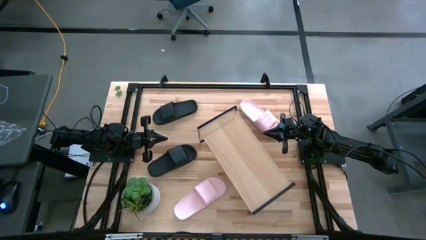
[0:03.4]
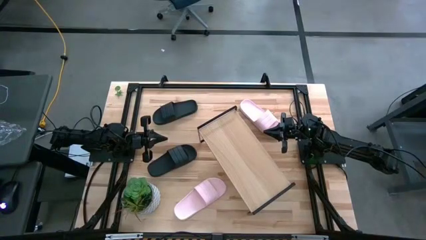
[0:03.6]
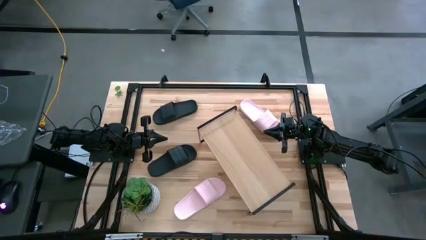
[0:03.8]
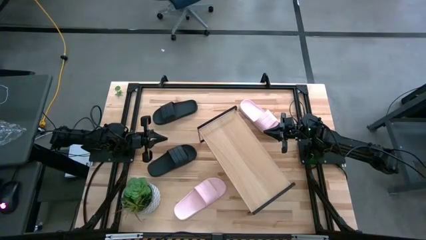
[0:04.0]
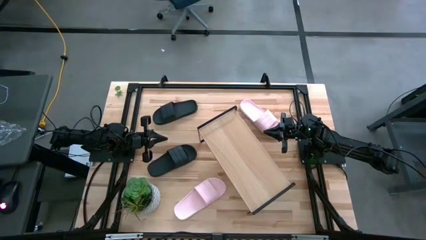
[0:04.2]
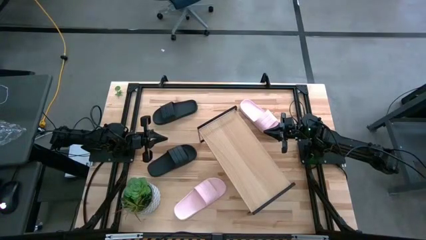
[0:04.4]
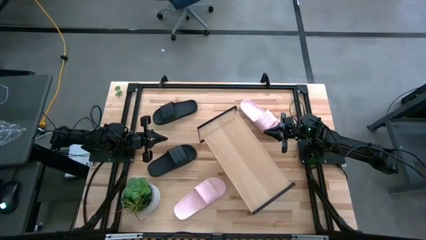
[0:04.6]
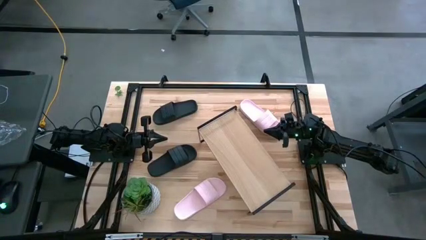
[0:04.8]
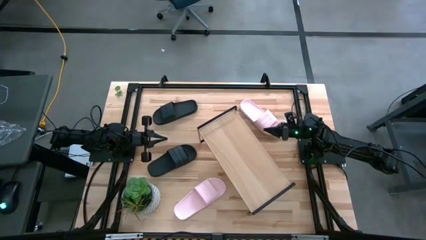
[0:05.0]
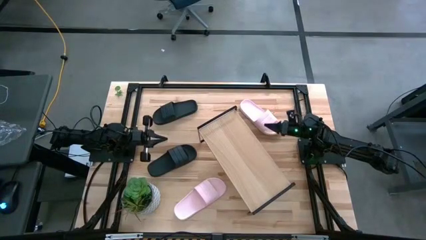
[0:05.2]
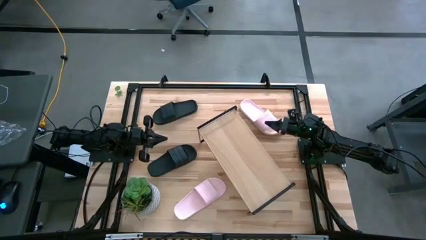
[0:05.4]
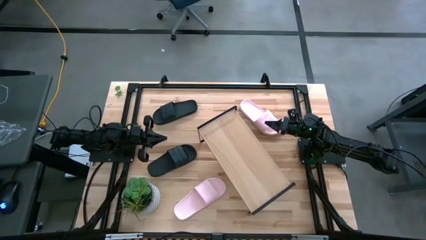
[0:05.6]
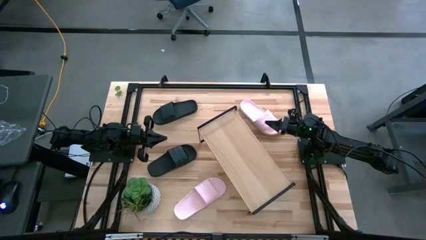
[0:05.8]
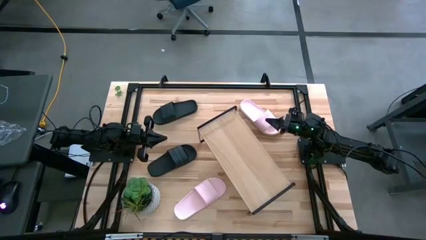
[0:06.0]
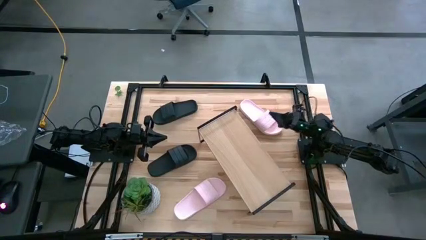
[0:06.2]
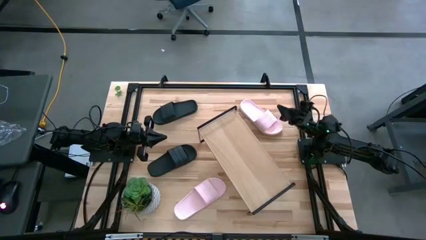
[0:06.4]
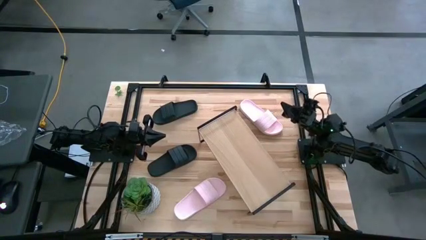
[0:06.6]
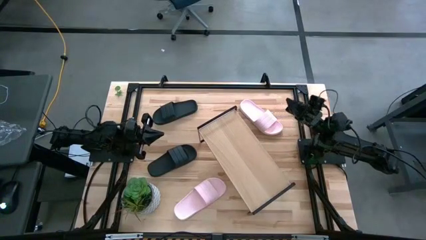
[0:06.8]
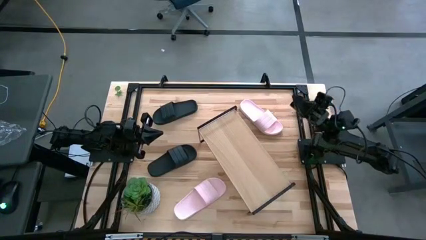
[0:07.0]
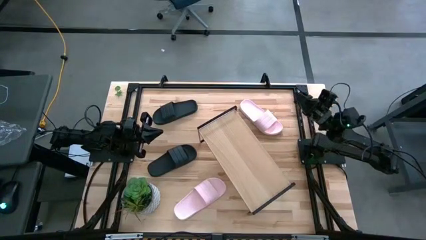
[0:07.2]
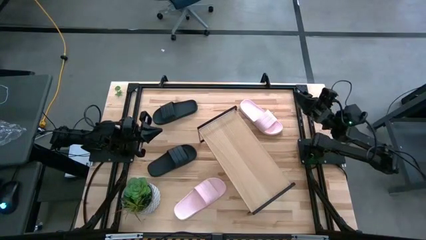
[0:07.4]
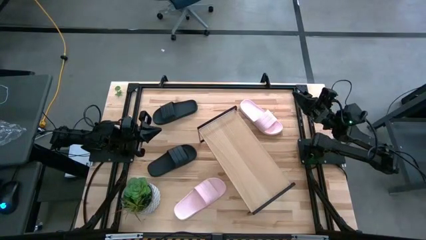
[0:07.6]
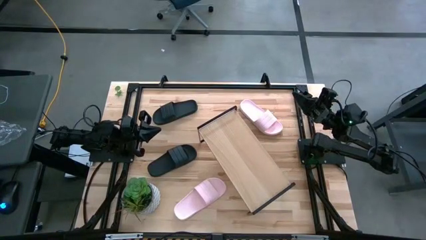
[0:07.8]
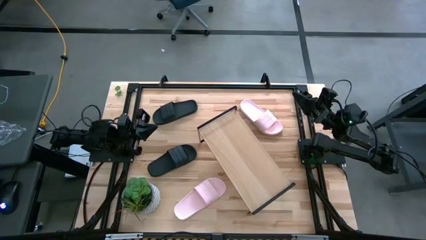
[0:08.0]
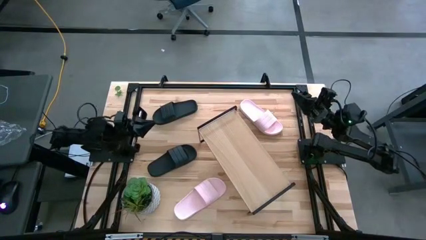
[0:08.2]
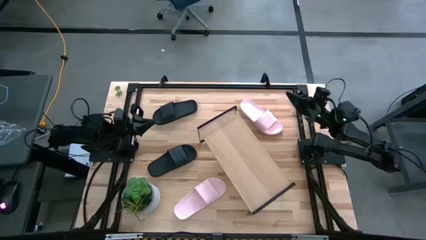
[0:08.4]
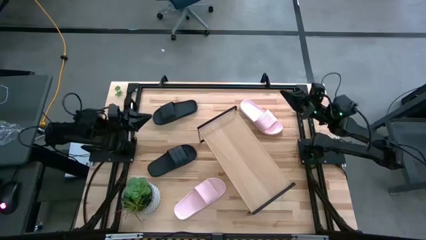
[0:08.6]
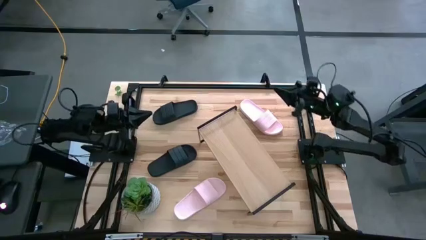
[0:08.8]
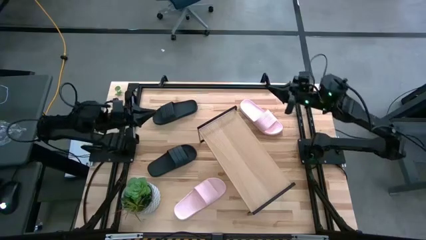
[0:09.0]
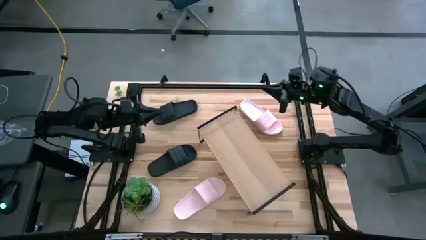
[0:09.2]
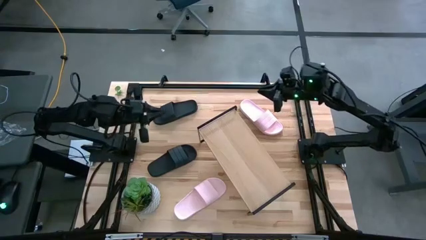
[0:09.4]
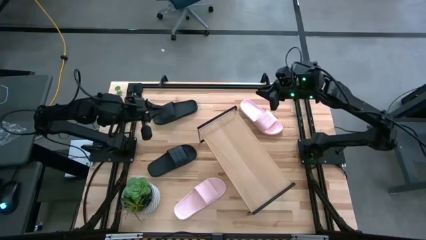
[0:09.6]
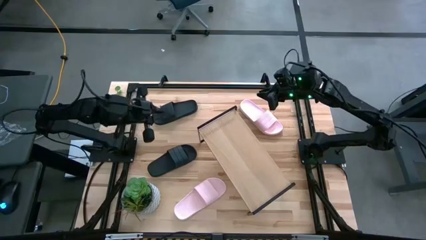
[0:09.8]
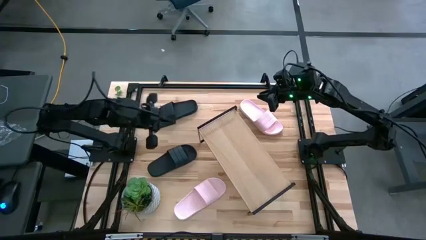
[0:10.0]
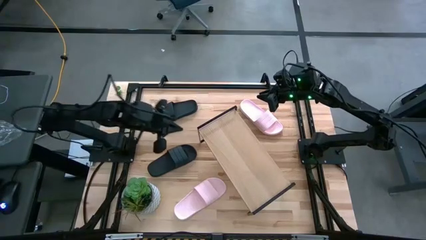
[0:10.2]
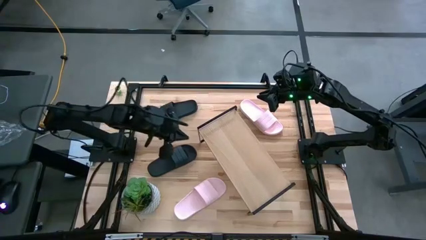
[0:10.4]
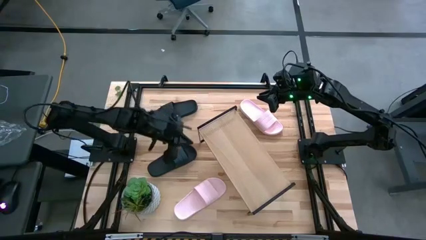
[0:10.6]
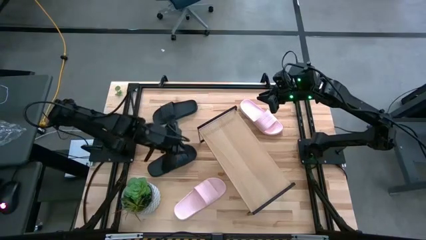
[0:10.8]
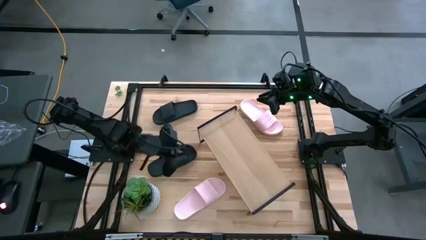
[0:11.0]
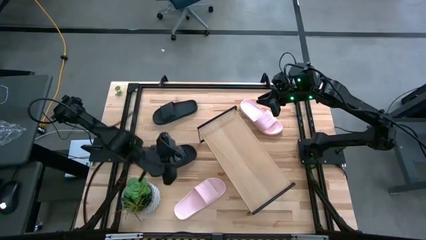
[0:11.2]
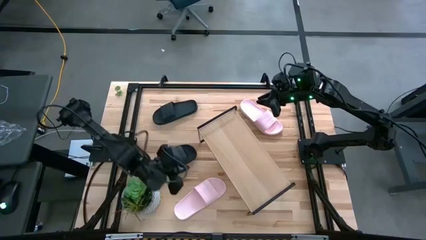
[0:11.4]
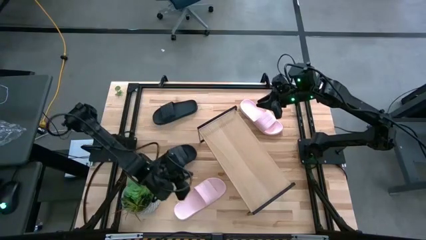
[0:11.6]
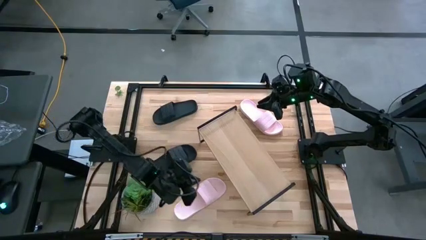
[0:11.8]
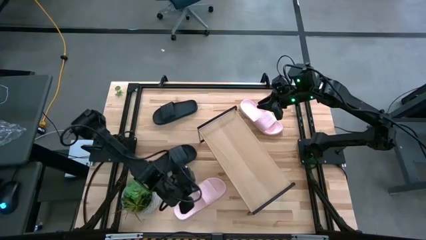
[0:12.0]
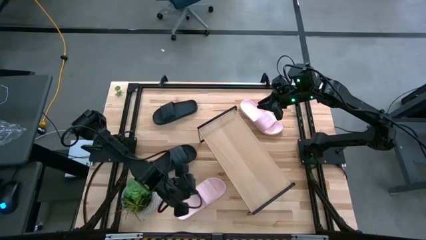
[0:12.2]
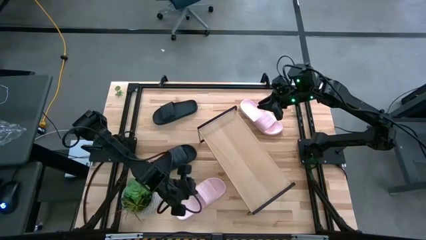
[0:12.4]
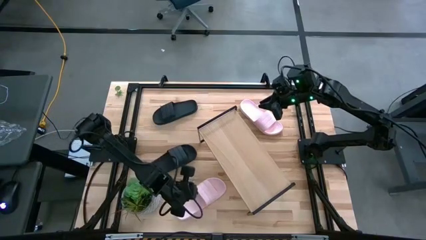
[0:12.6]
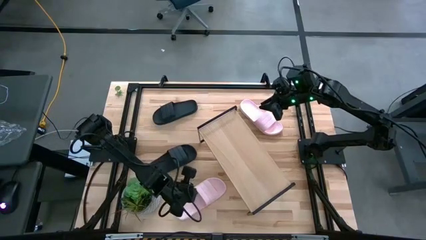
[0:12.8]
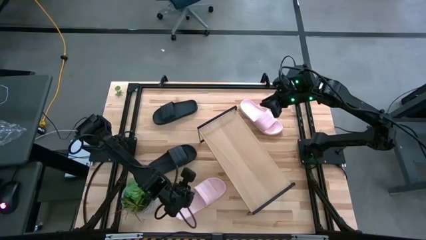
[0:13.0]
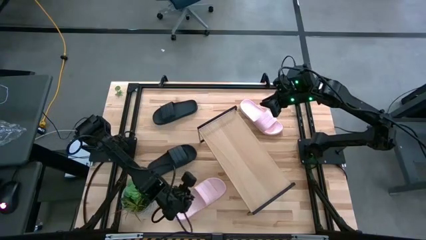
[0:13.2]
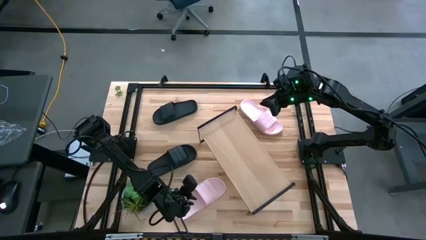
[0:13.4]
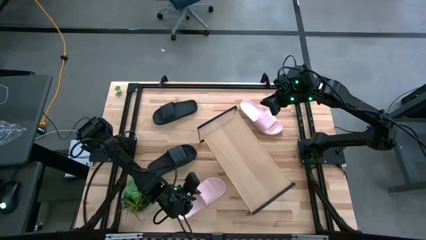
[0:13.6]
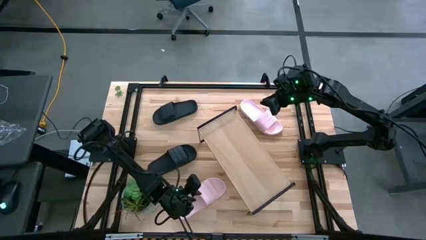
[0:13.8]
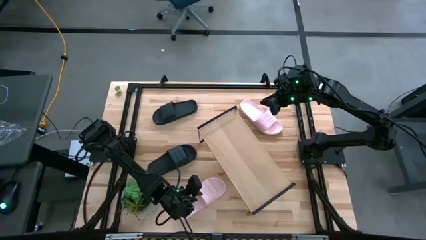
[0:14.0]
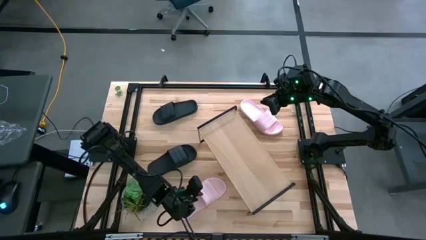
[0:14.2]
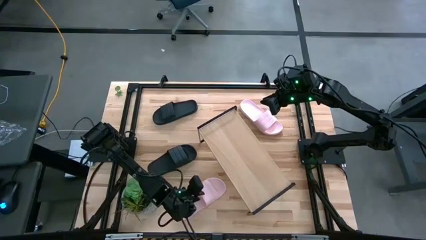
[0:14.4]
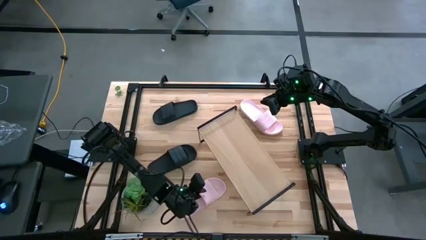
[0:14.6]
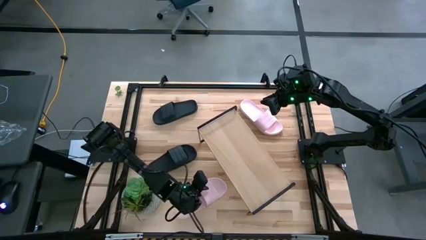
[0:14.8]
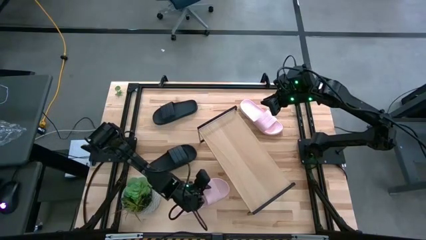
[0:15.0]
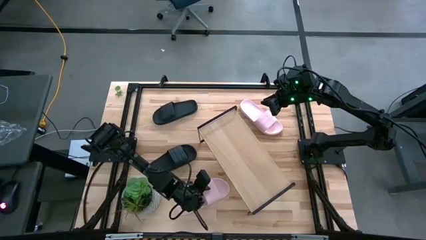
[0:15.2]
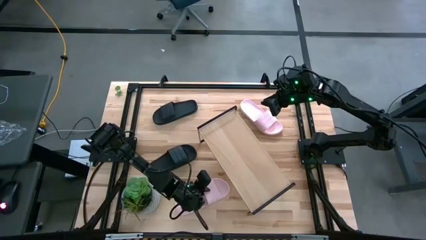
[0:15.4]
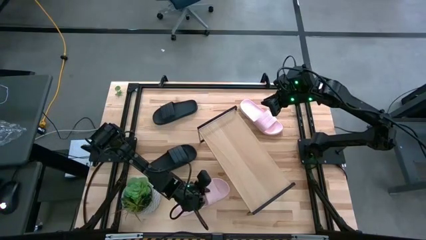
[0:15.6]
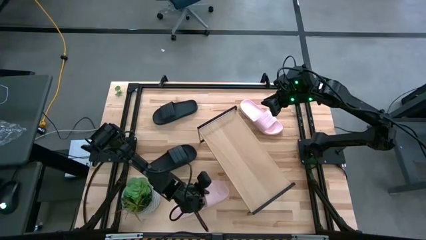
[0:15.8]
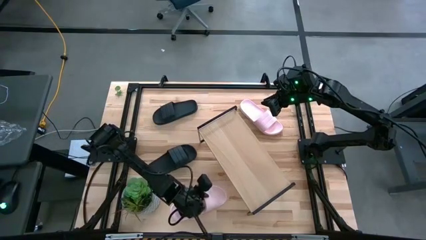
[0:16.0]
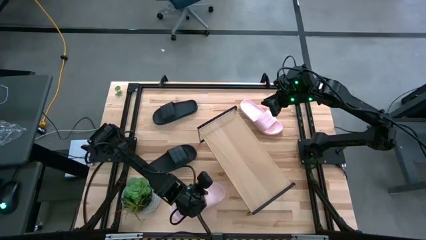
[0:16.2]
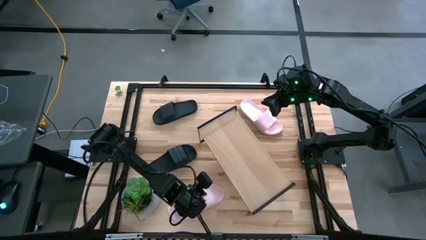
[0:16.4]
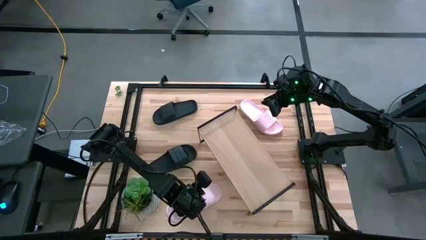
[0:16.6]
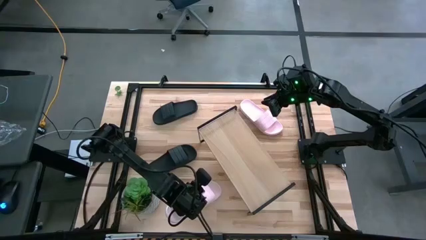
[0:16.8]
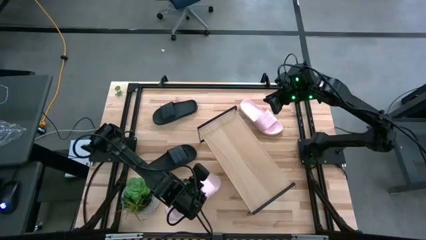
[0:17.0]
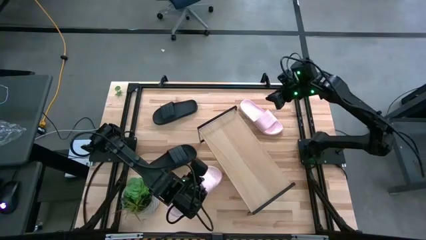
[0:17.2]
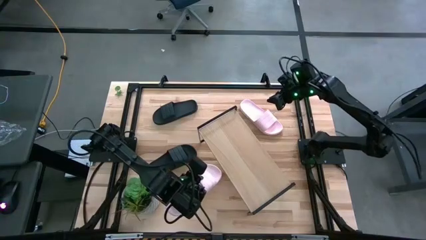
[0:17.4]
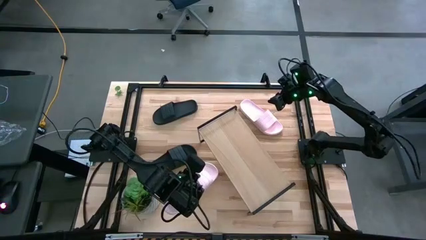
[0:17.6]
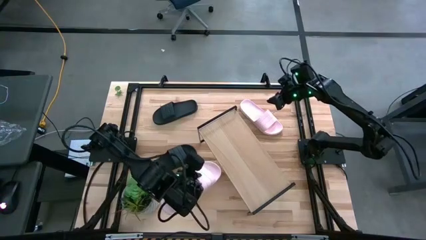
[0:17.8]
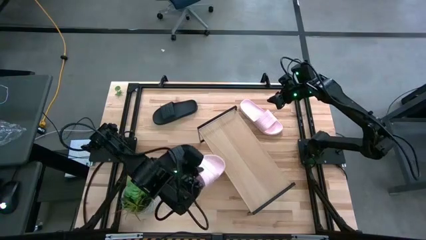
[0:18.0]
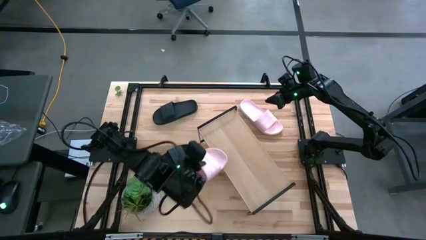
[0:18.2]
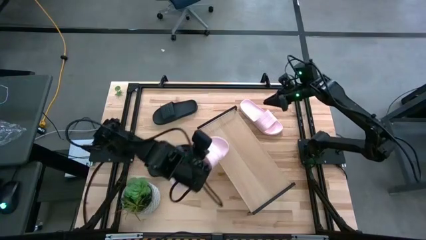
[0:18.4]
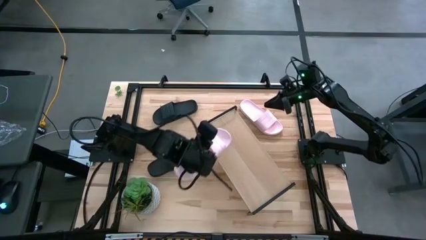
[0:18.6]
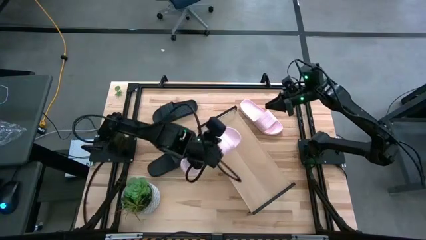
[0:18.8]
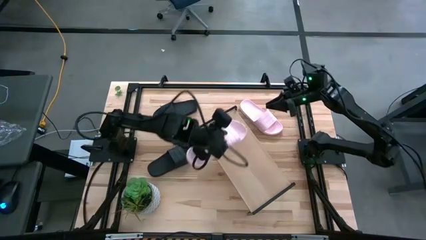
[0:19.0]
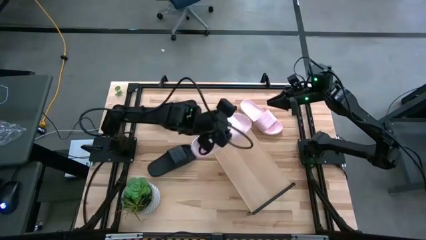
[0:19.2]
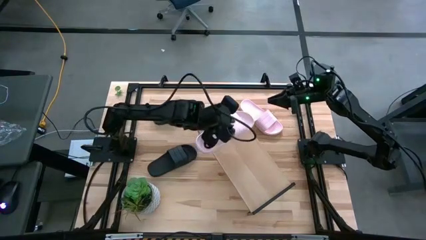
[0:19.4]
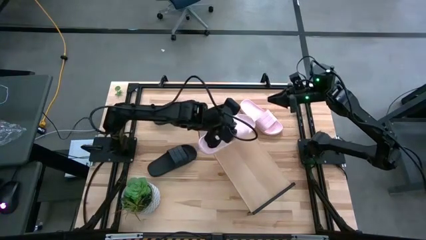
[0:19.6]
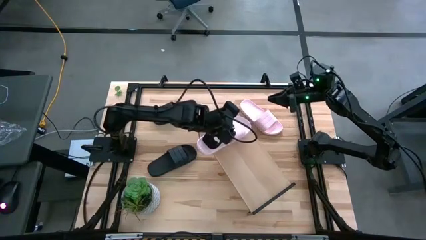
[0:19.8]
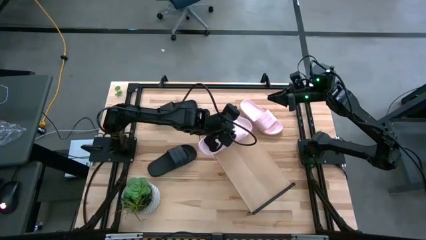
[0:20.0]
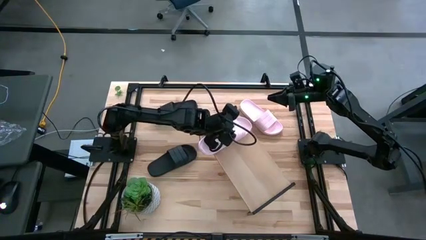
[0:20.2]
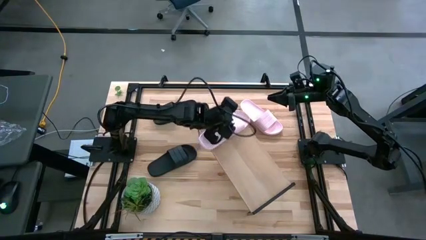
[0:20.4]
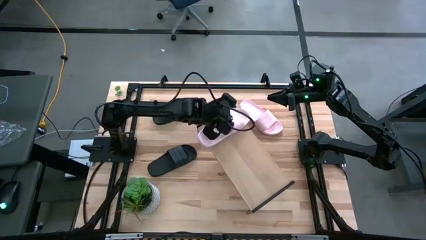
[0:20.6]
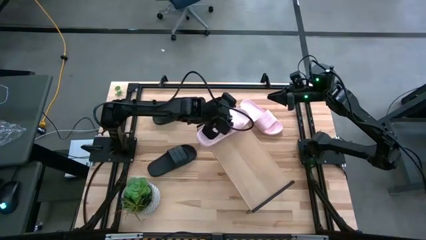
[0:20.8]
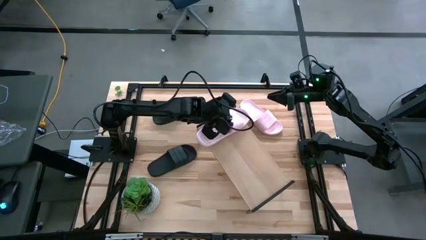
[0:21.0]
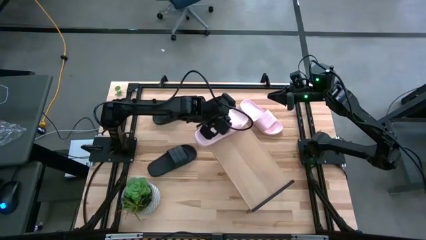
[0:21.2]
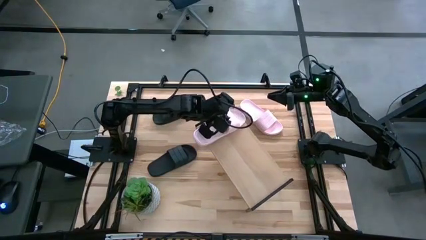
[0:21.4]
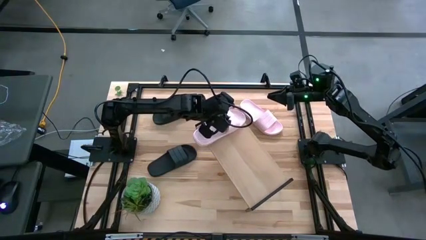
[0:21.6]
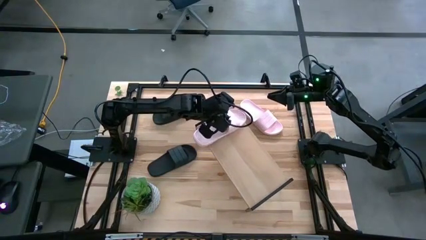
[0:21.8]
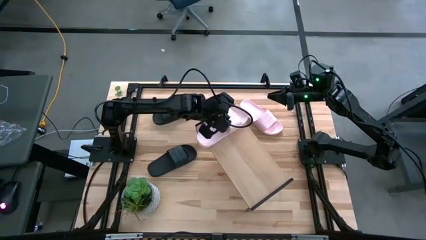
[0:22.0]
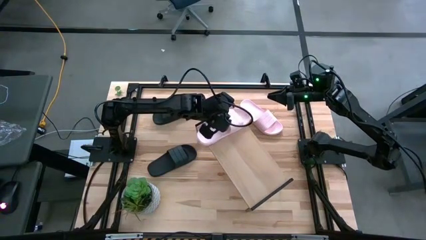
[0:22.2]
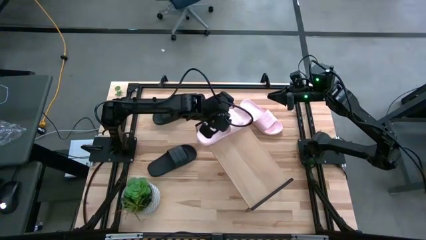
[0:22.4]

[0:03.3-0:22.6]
Task: Pick and place slides into the shelf
Put the bottom pink slide on the shelf
